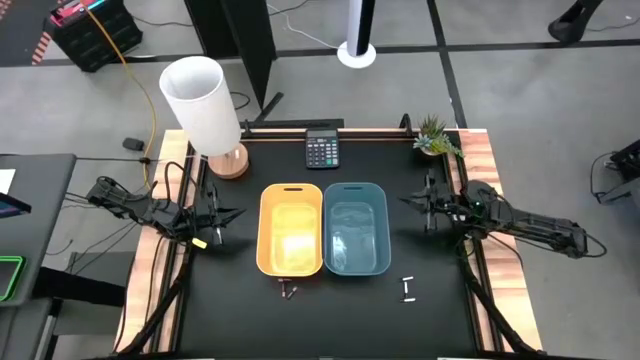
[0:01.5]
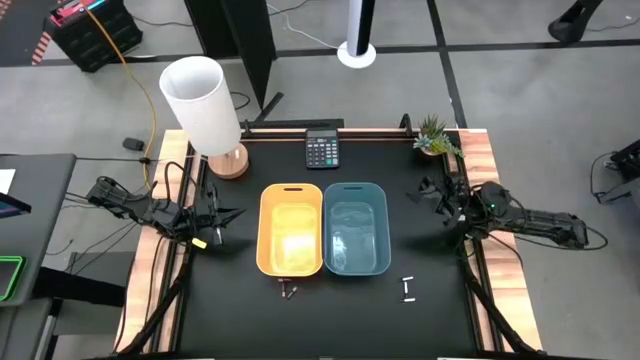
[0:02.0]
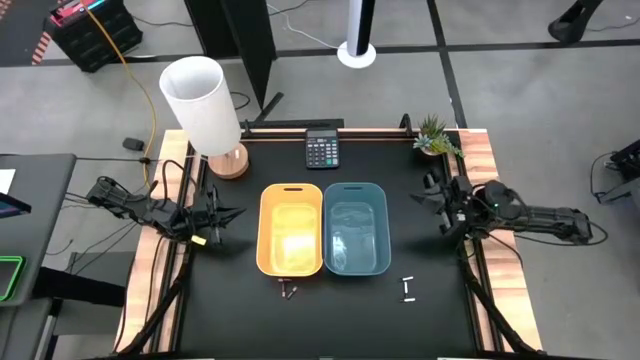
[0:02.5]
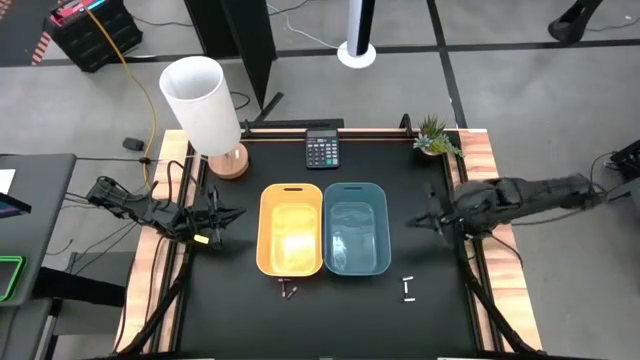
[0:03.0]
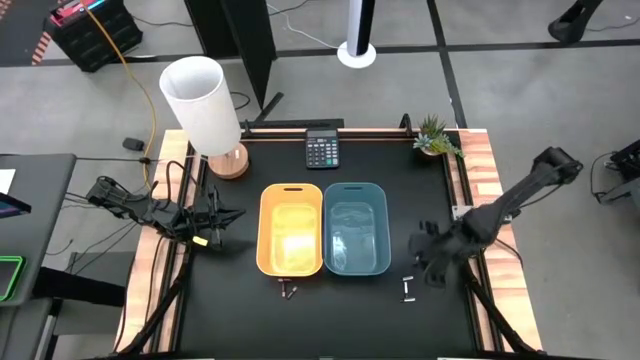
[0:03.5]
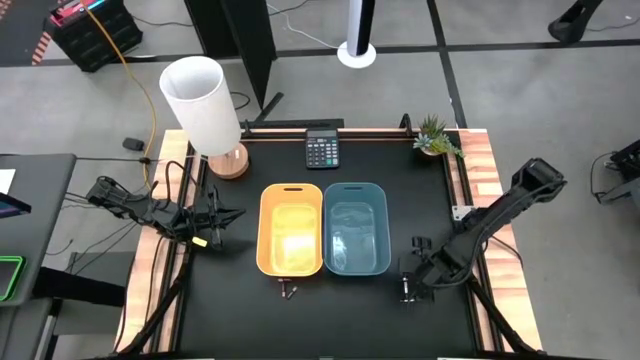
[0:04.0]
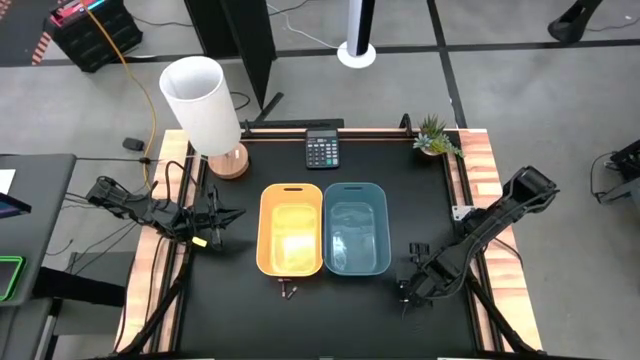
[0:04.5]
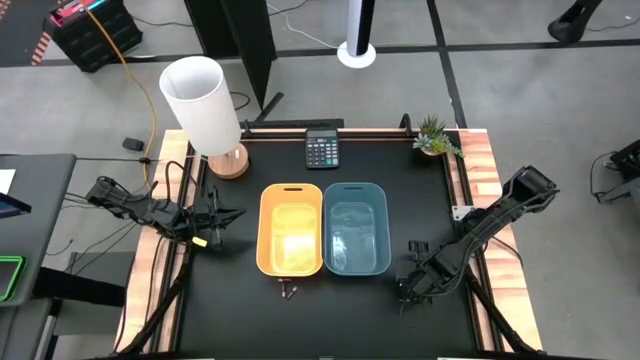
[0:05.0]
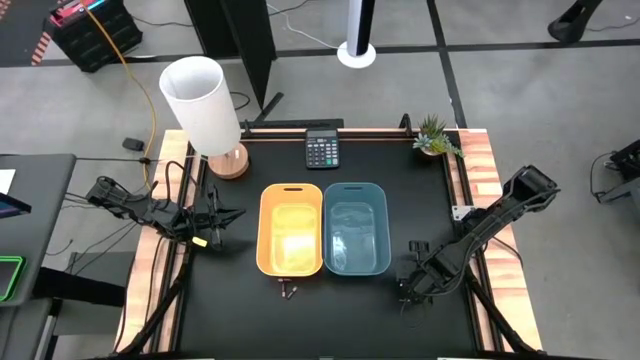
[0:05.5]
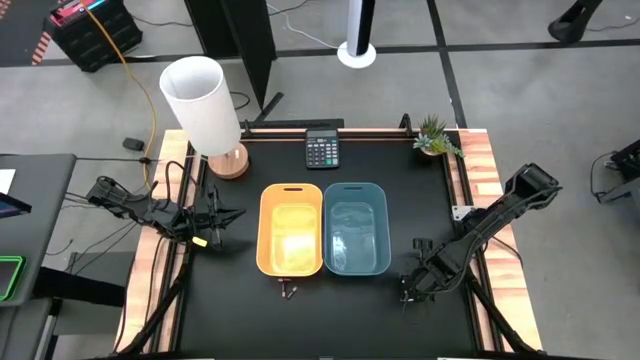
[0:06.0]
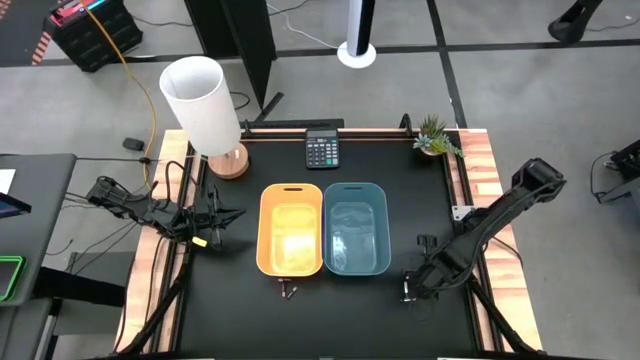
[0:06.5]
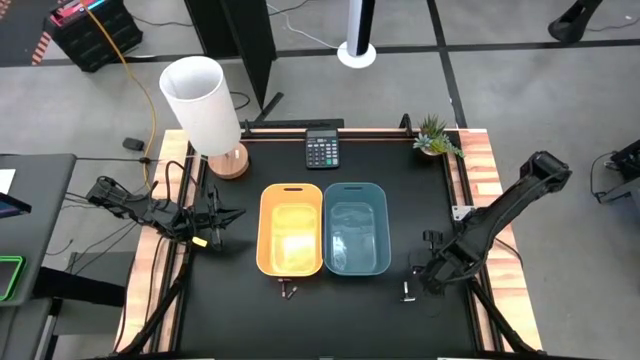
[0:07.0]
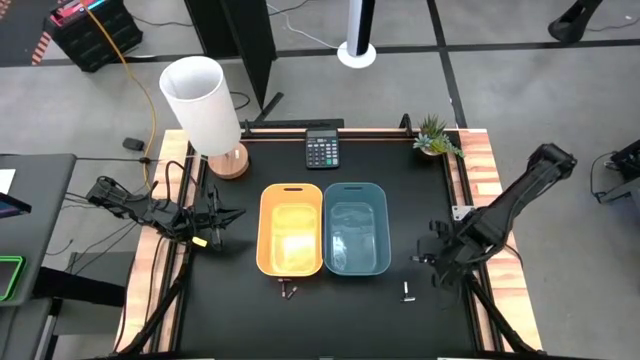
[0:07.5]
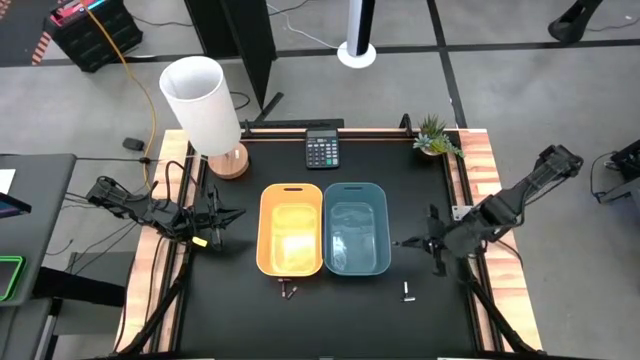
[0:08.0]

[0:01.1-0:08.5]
Task: Sort batteries
Put the top silver battery into the blue bin

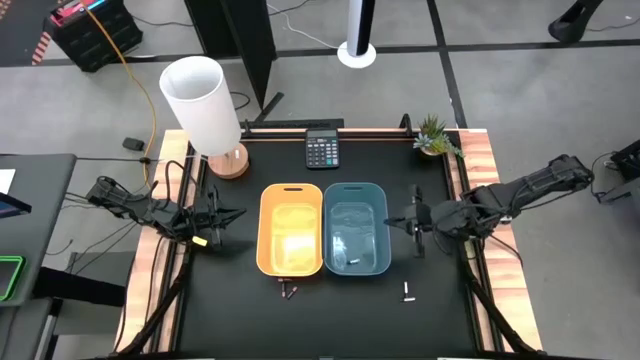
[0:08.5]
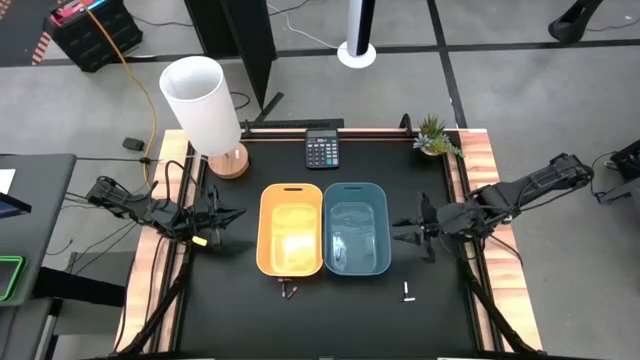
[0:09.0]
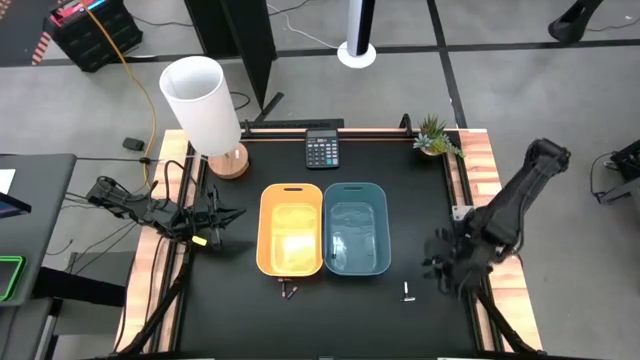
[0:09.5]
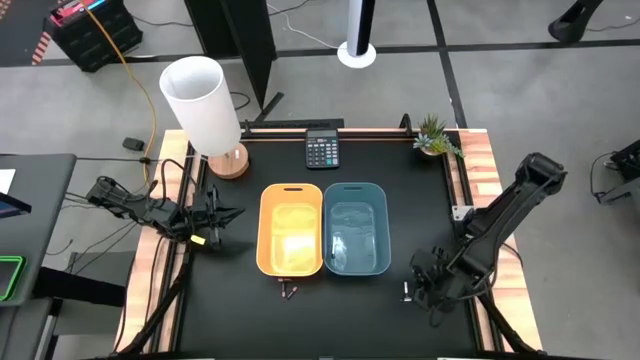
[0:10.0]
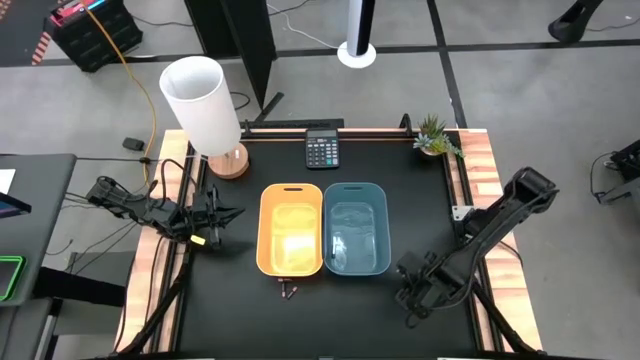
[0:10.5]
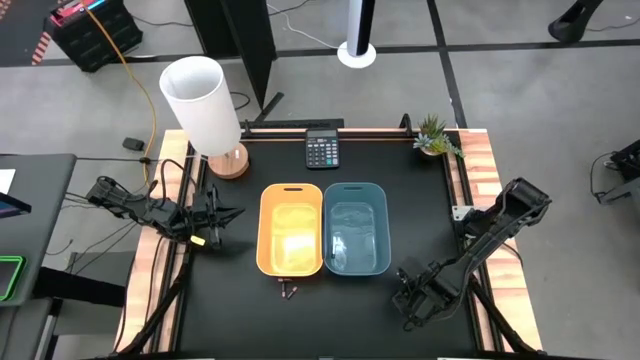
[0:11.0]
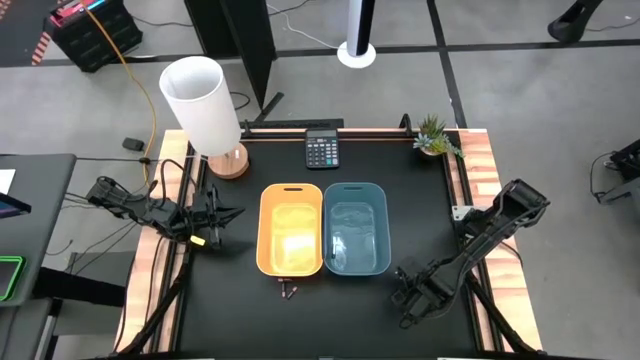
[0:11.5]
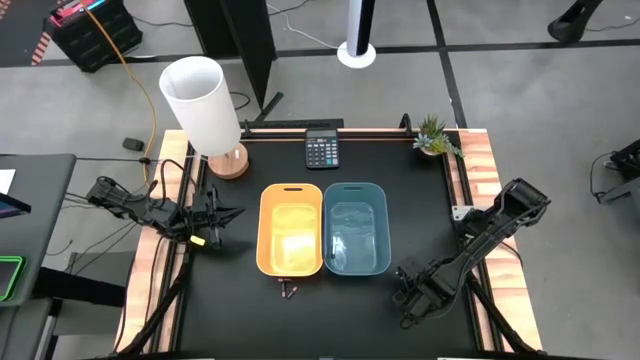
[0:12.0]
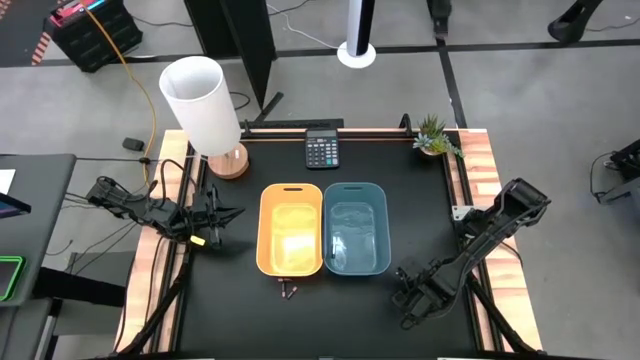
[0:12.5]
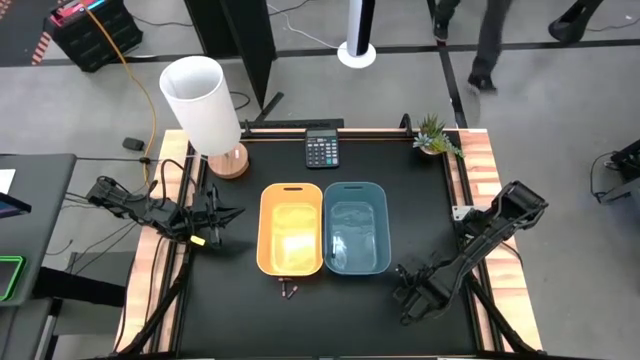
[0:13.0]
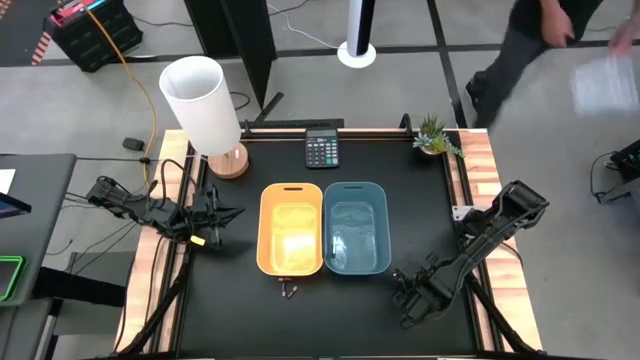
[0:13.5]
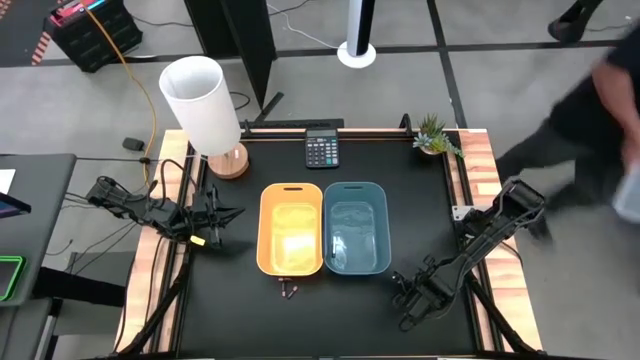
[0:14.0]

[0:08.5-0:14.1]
Put the top silver battery into the blue bin

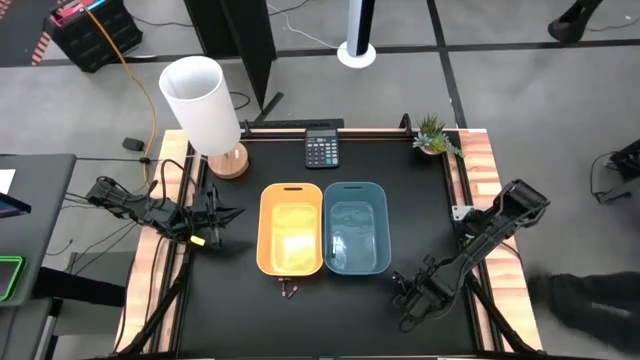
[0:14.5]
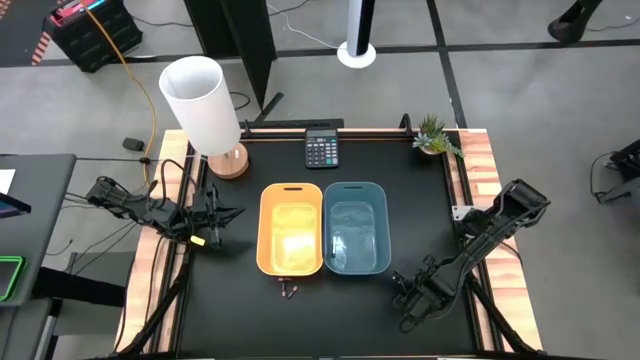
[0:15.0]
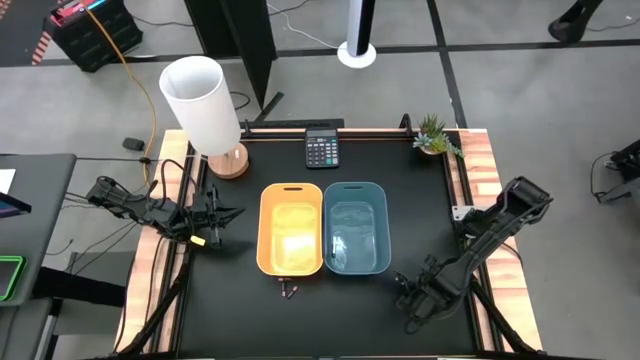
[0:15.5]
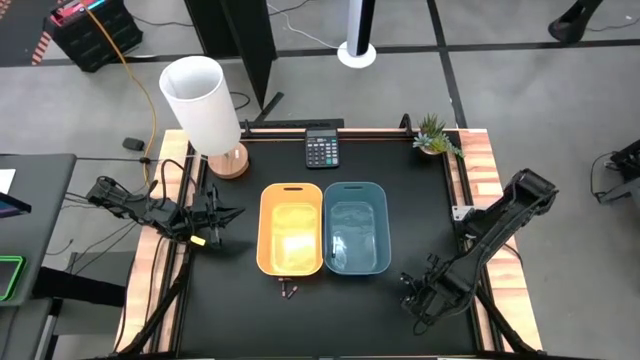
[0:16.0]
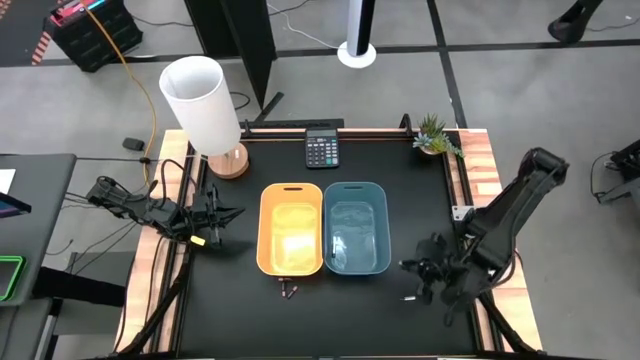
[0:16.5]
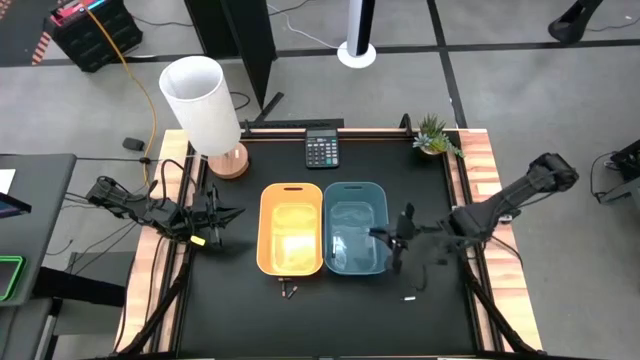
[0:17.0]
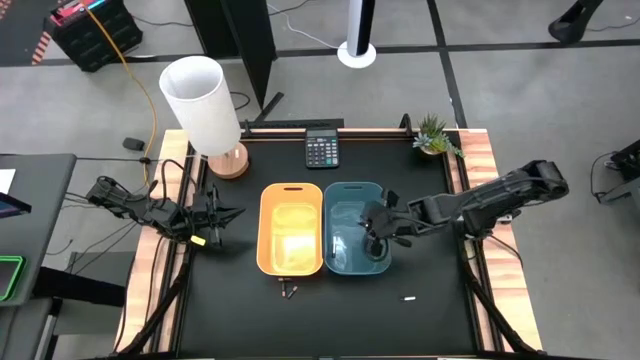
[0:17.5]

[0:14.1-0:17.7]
Put the top silver battery into the blue bin

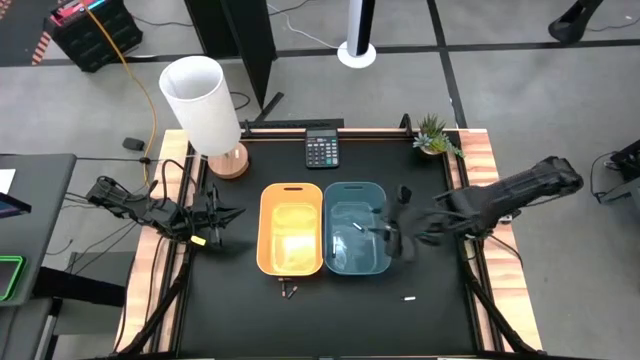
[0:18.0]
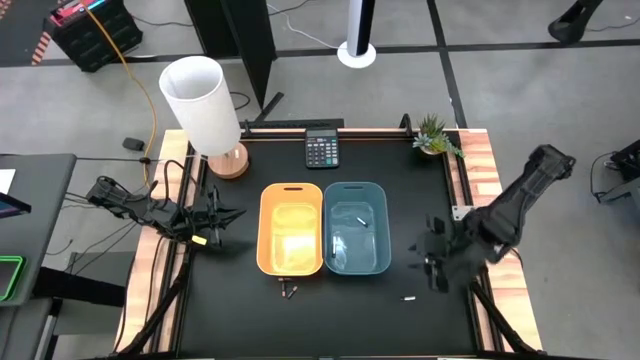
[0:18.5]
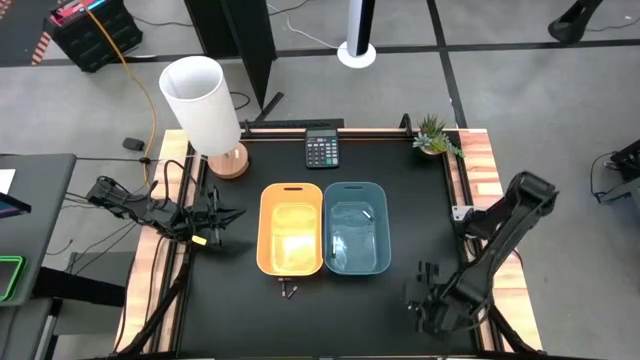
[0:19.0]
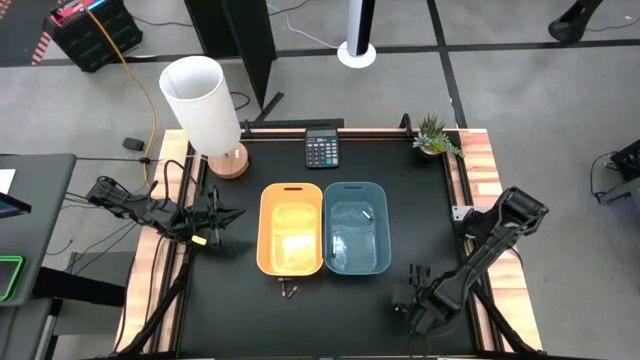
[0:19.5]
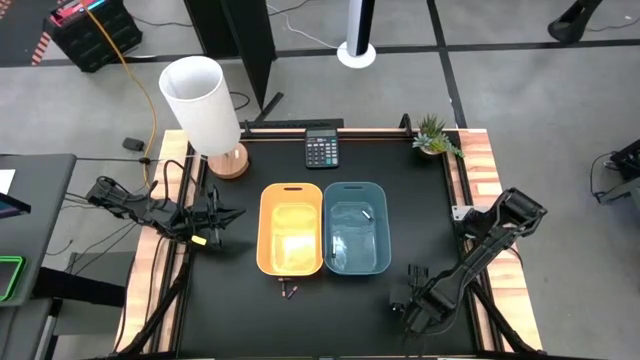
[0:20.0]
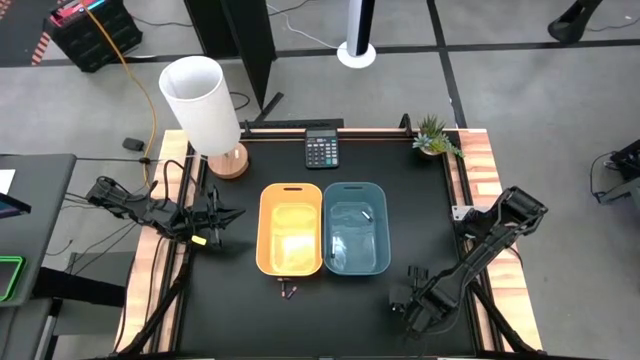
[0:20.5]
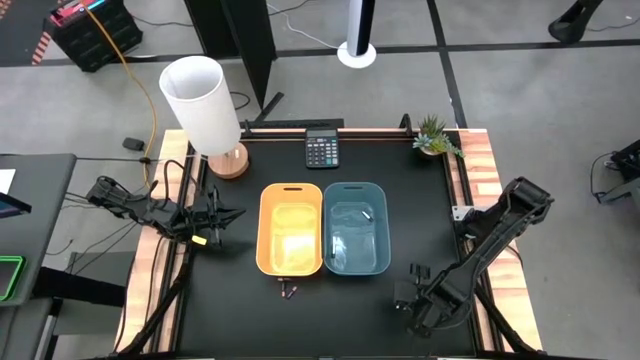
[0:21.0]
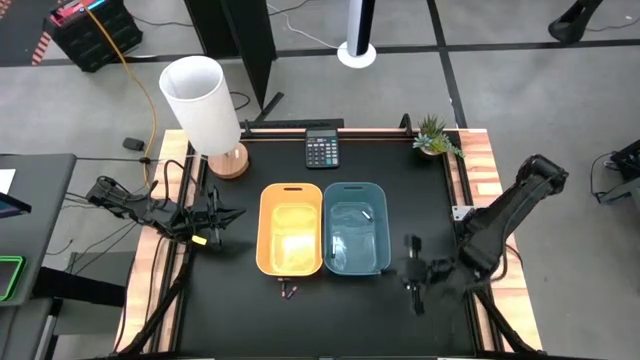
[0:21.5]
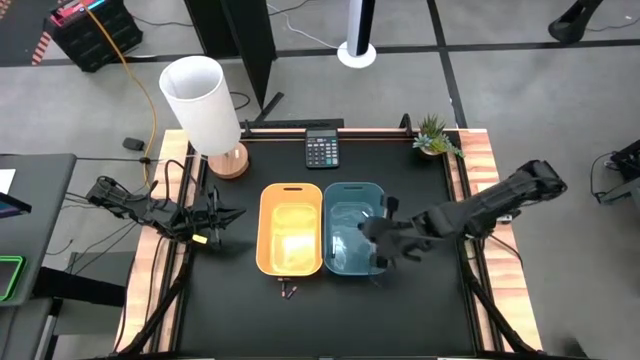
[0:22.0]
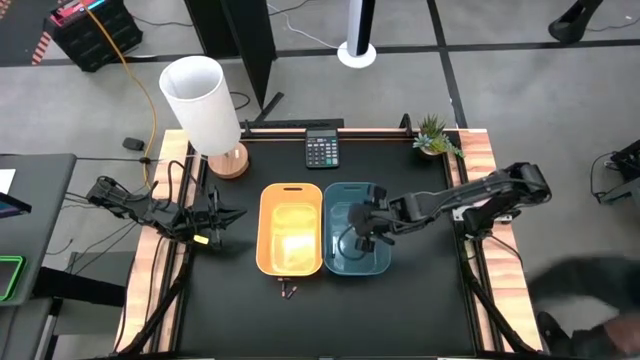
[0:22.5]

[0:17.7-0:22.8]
Put the silver battery into the blue bin
